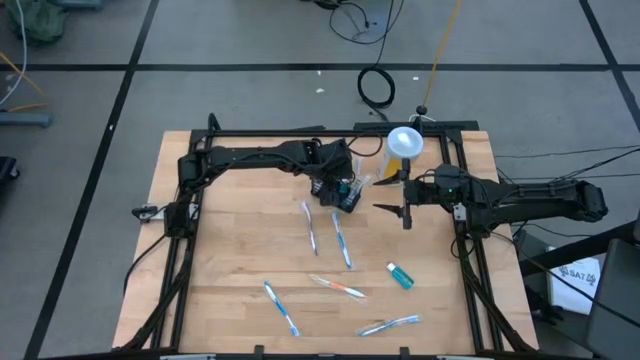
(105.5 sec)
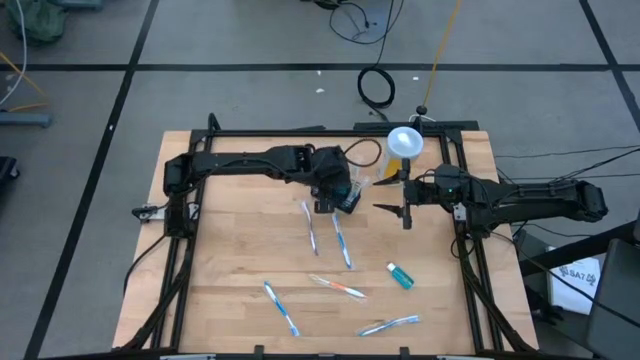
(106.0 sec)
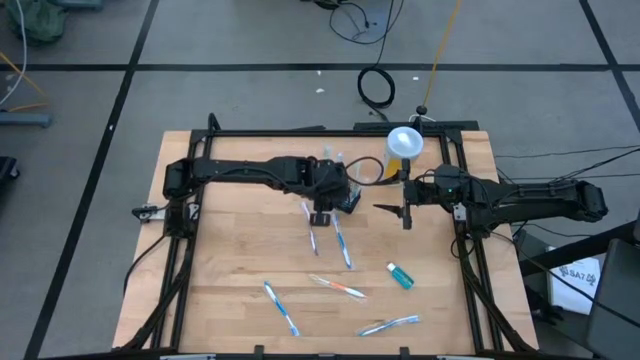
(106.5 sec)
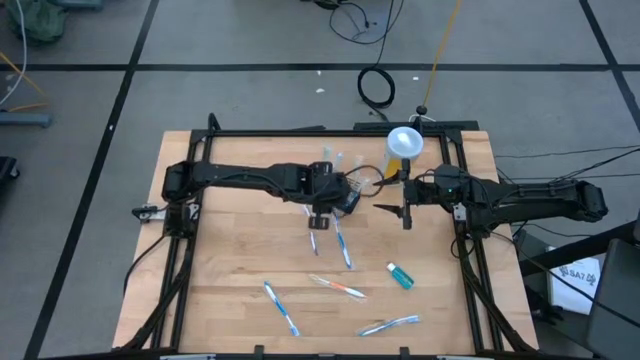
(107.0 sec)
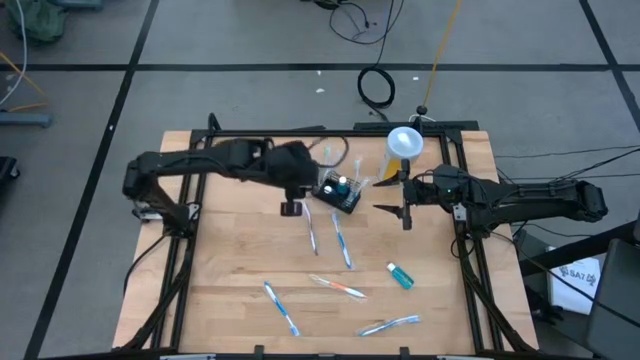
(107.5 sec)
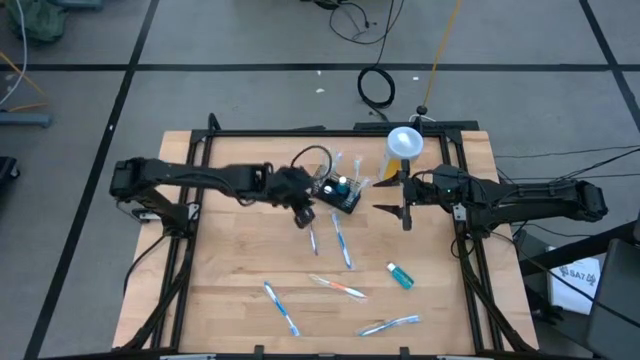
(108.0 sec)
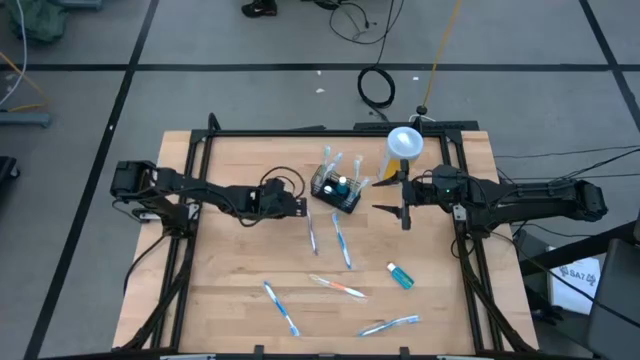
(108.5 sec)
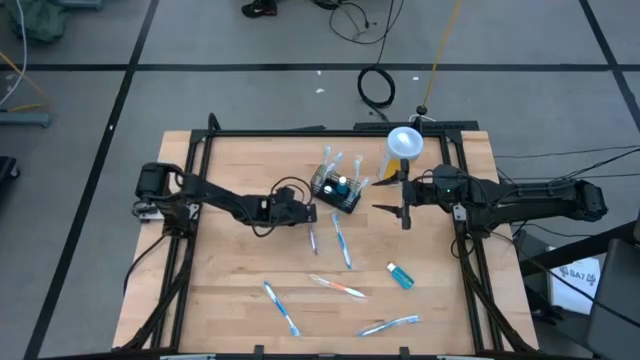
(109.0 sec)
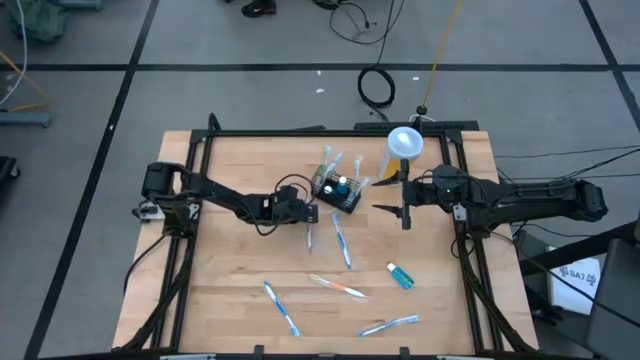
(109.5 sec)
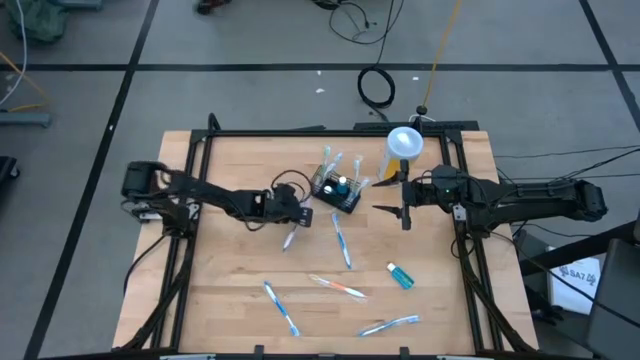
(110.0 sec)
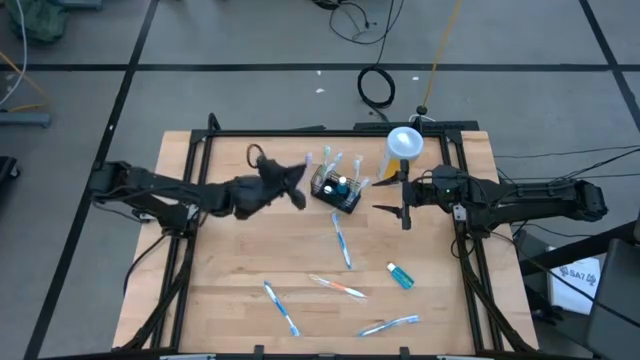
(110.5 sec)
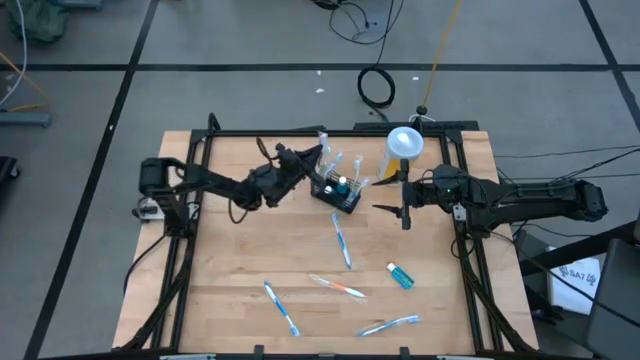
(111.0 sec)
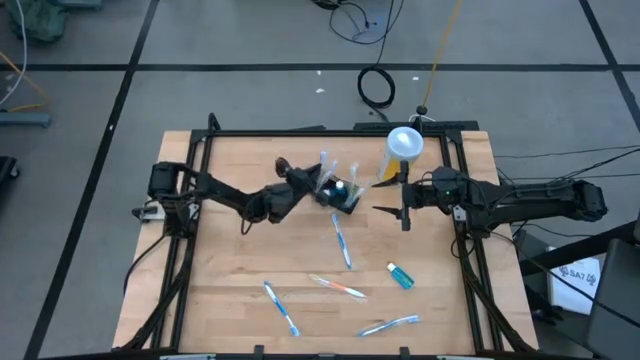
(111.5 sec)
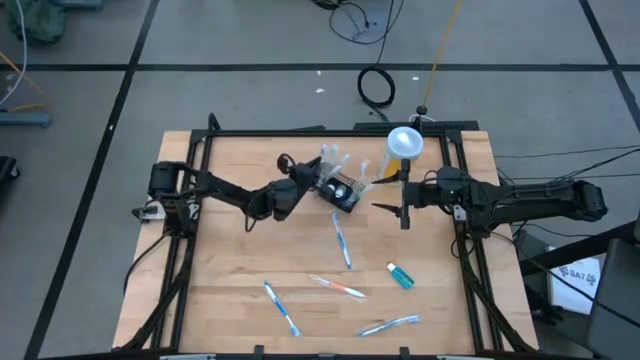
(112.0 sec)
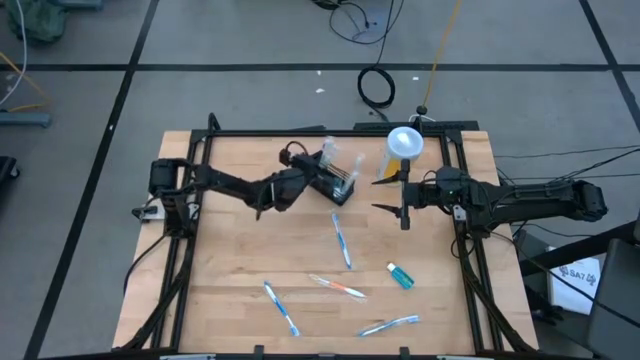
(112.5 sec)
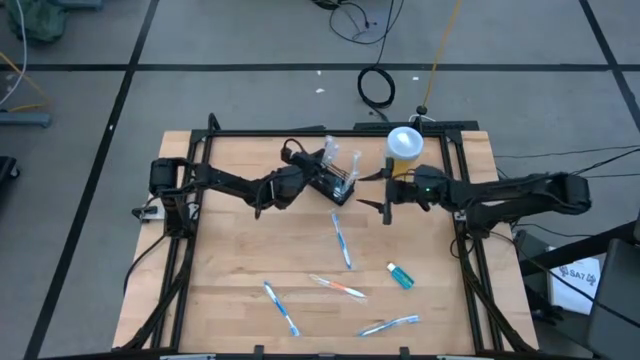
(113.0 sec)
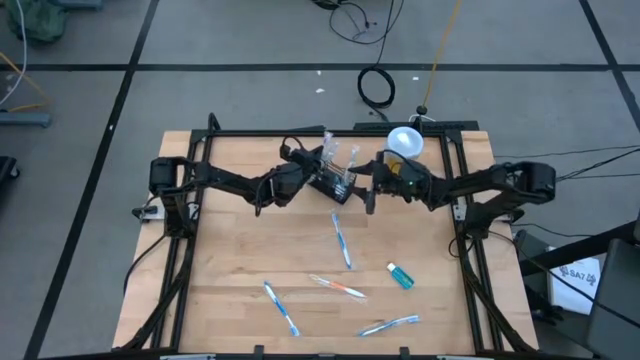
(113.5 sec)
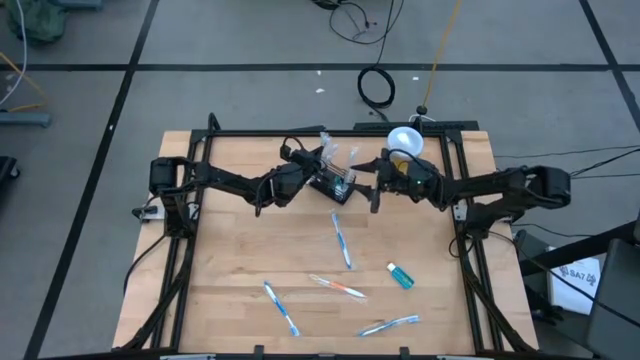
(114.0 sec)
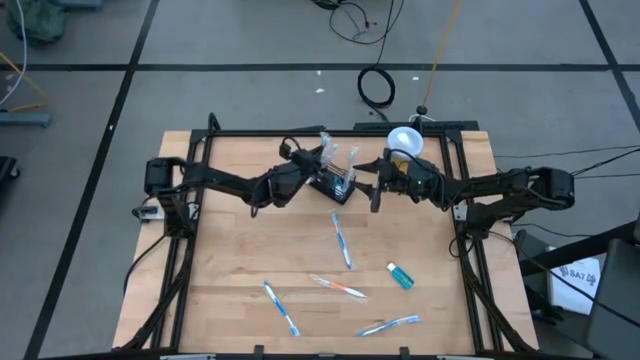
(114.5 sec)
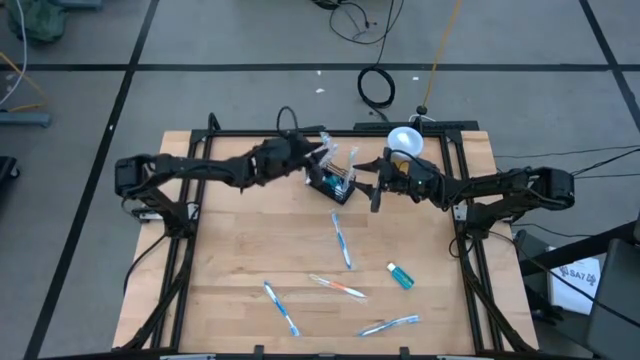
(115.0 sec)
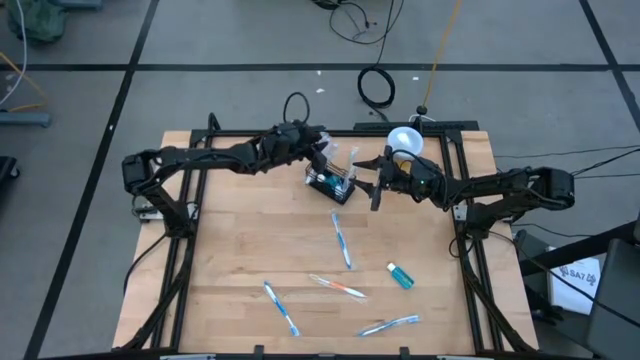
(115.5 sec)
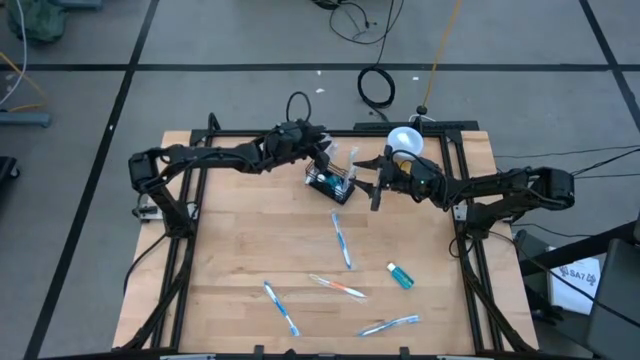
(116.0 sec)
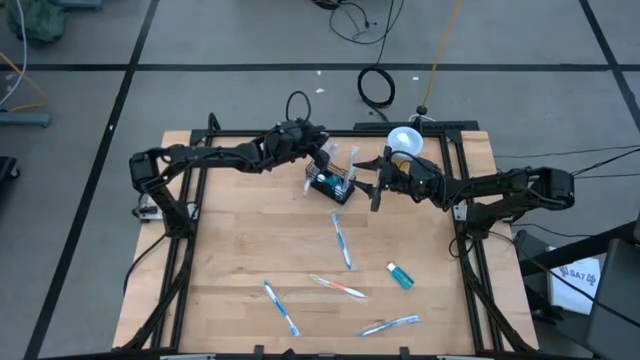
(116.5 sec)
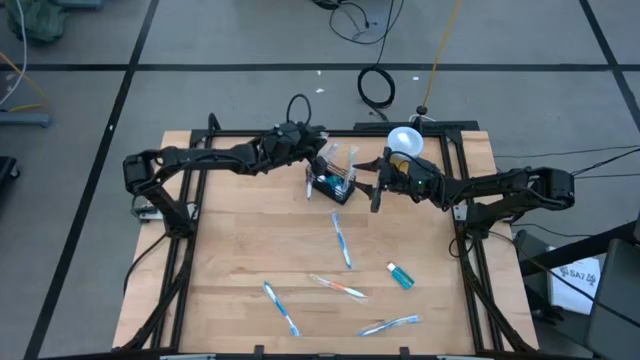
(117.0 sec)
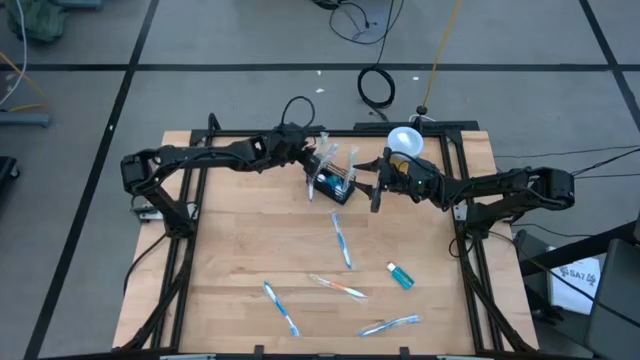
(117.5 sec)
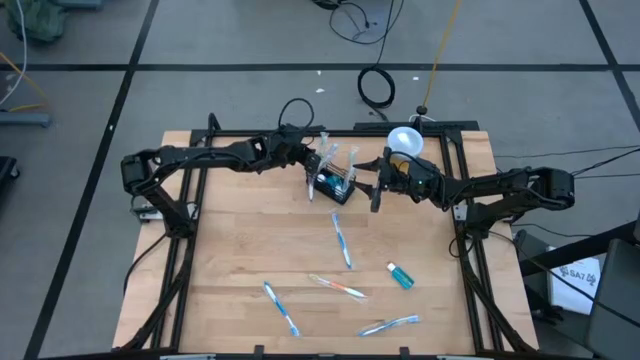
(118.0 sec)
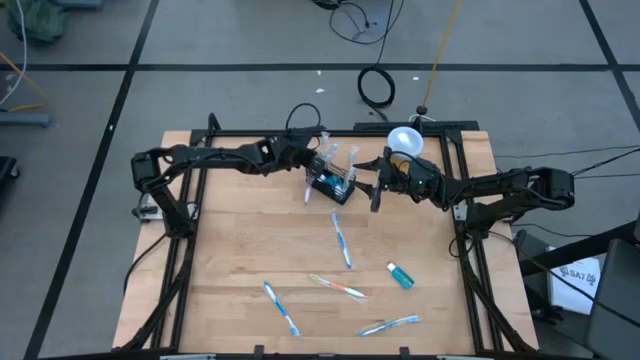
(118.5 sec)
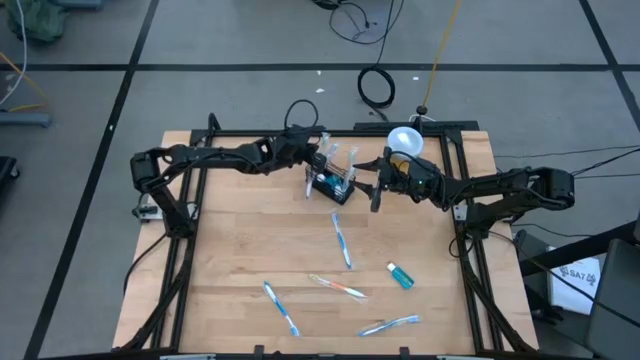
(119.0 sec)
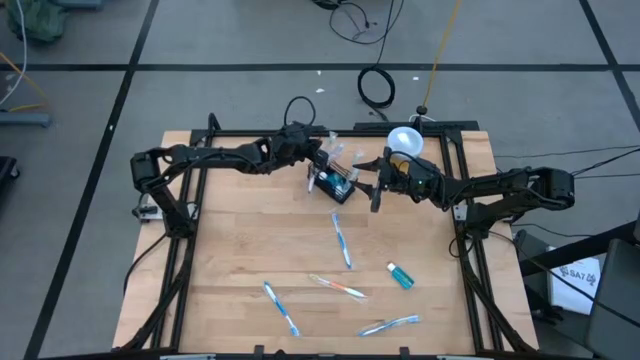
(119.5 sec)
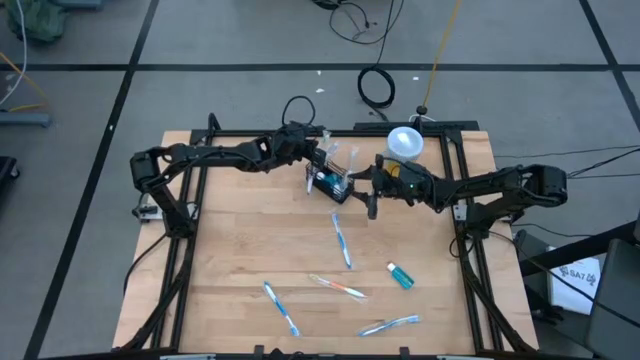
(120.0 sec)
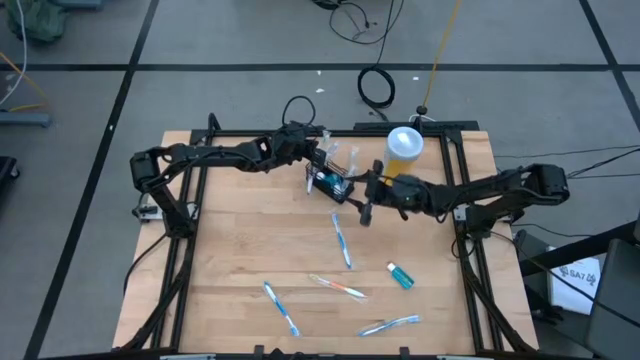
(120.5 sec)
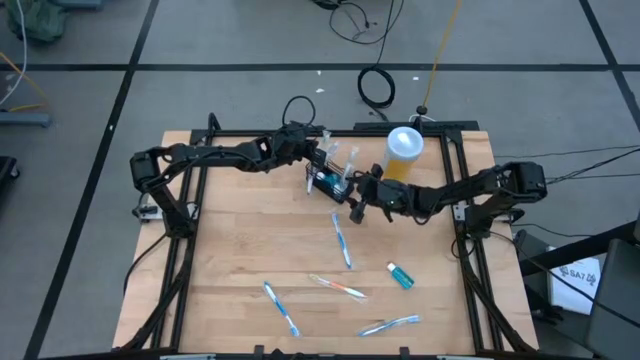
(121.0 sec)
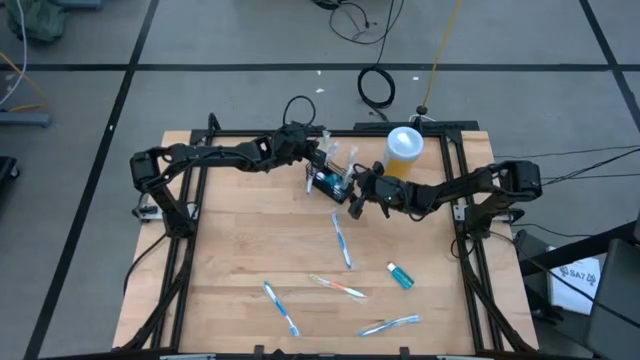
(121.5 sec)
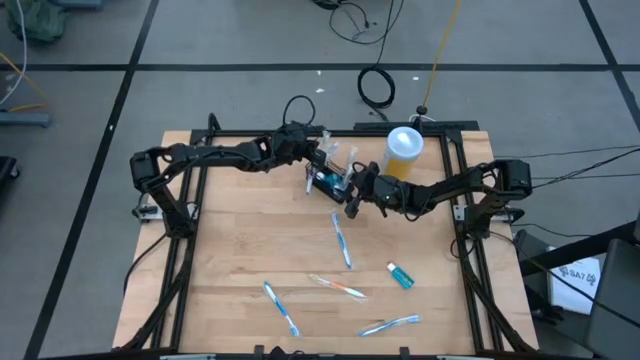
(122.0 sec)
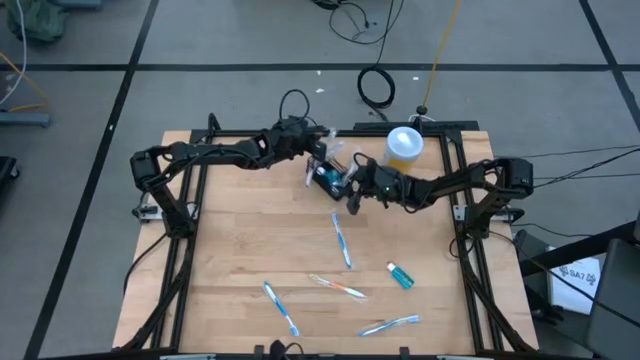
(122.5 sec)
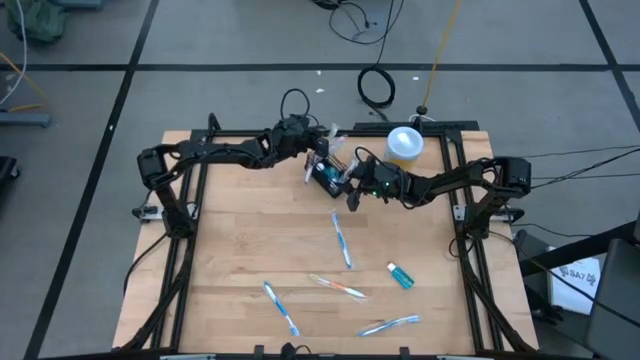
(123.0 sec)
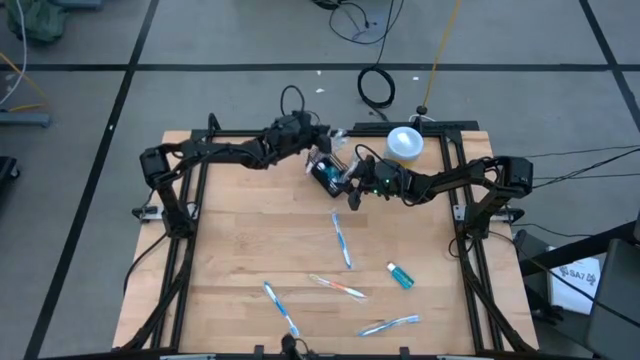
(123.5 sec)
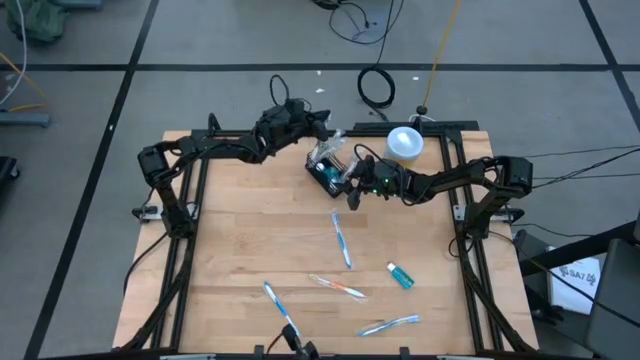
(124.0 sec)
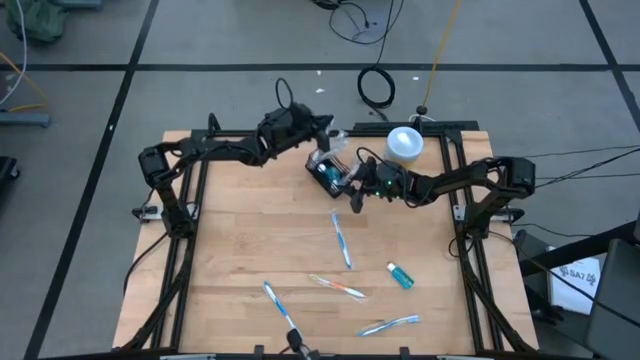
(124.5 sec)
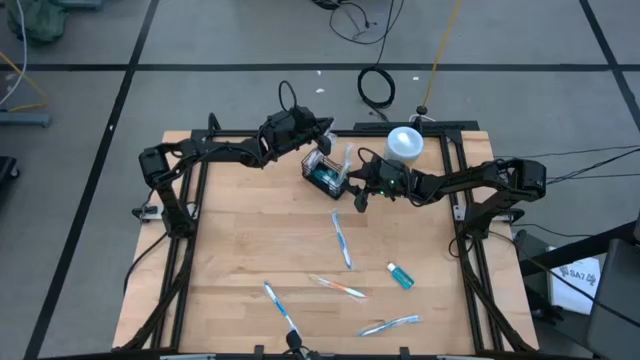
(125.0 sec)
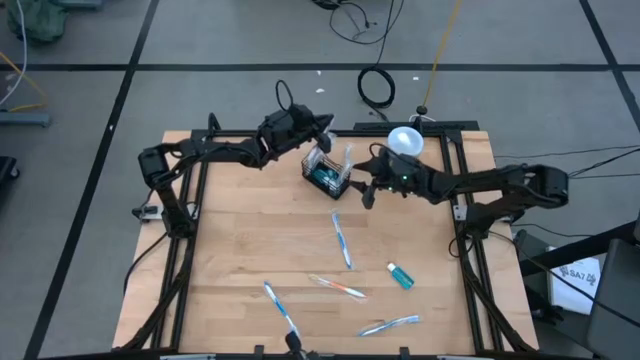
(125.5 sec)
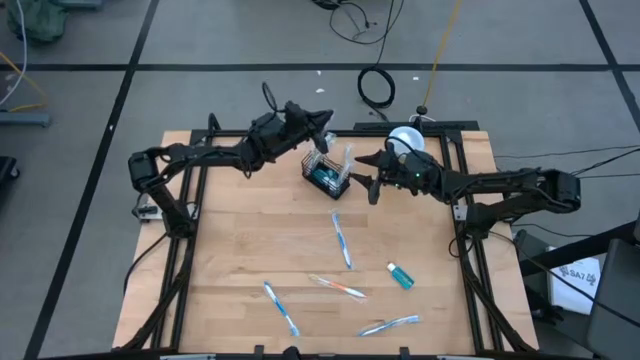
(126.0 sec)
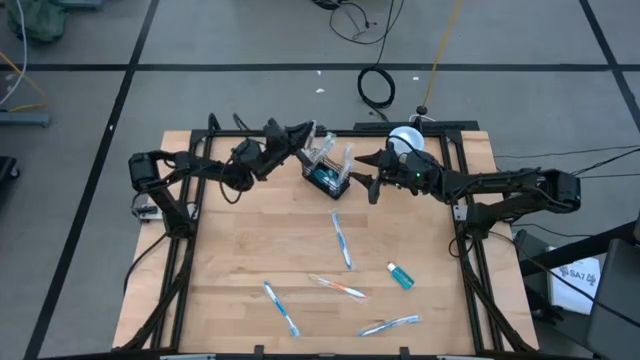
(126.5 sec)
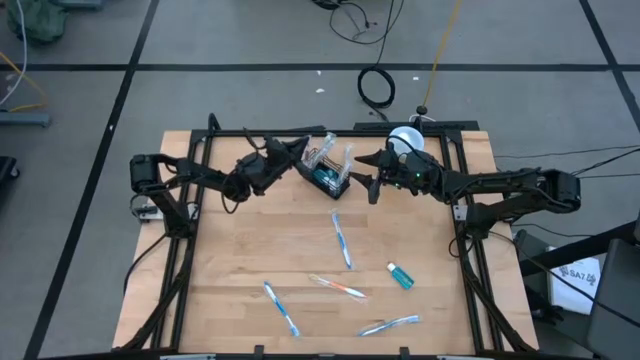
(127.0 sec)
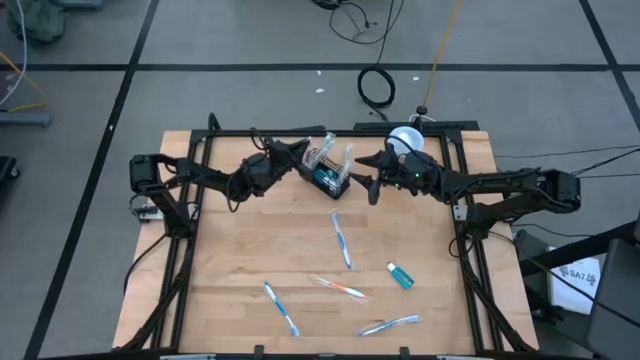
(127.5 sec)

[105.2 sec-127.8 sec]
Task: Pick & Place toothbrushing station
Put the purple toothbrush into the black organizer
